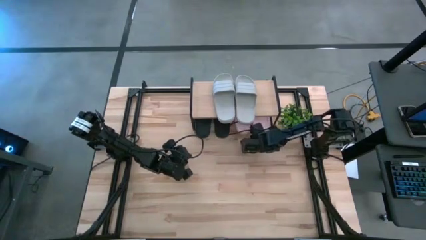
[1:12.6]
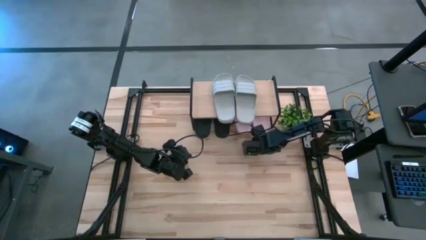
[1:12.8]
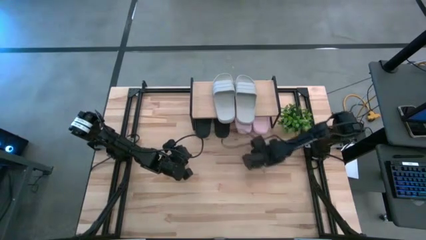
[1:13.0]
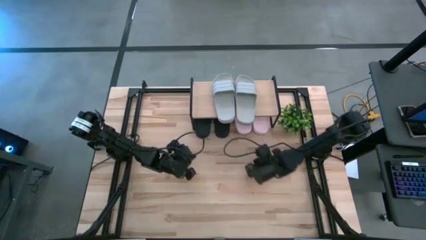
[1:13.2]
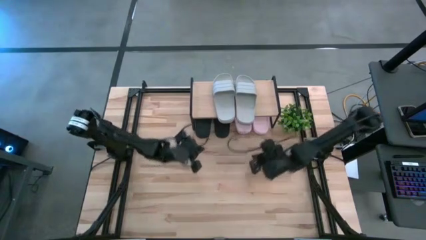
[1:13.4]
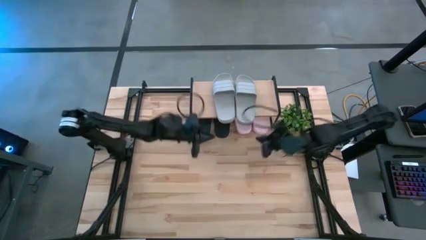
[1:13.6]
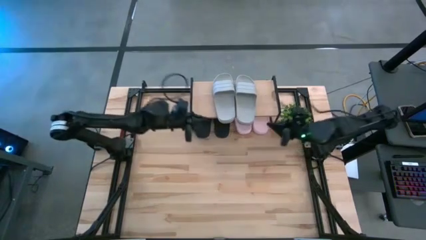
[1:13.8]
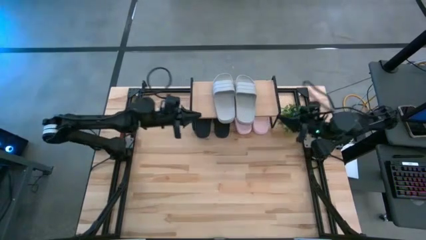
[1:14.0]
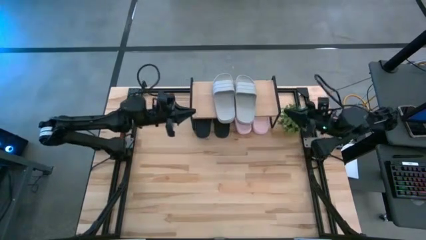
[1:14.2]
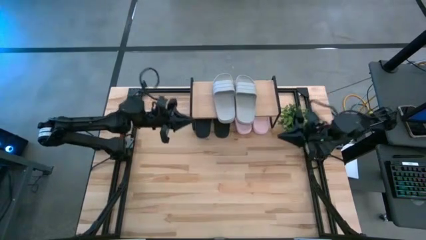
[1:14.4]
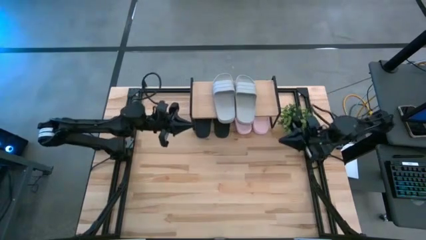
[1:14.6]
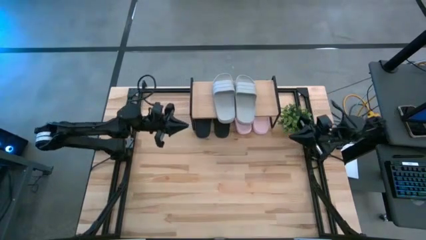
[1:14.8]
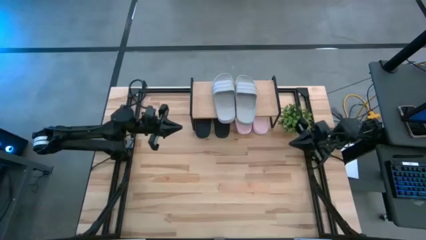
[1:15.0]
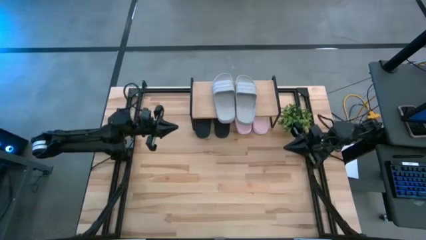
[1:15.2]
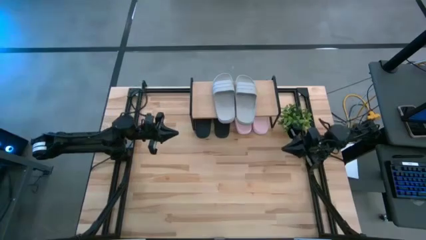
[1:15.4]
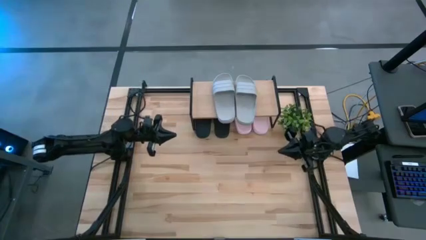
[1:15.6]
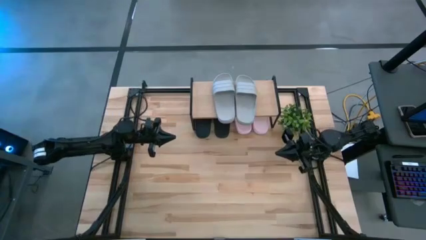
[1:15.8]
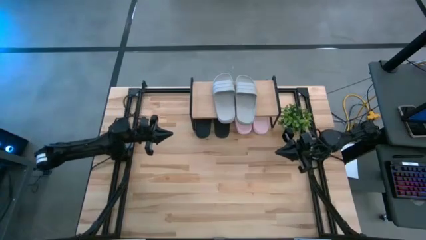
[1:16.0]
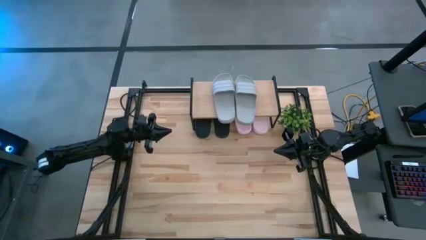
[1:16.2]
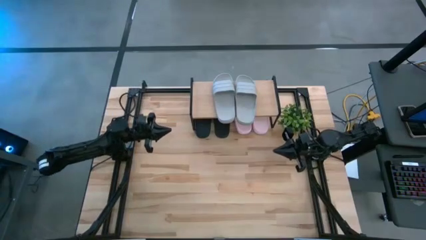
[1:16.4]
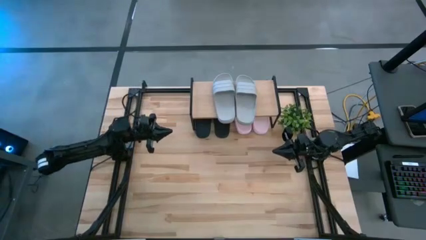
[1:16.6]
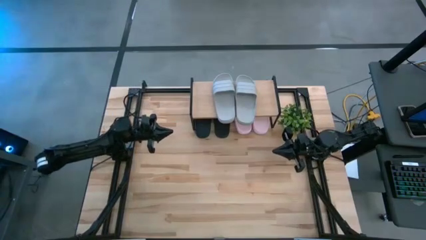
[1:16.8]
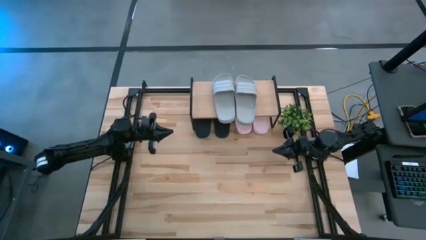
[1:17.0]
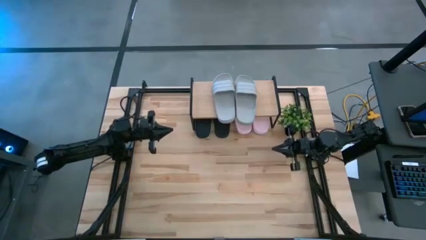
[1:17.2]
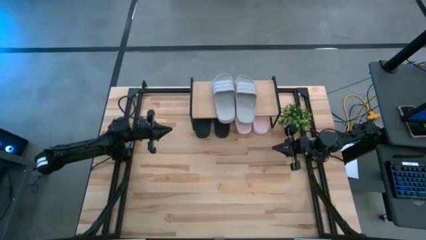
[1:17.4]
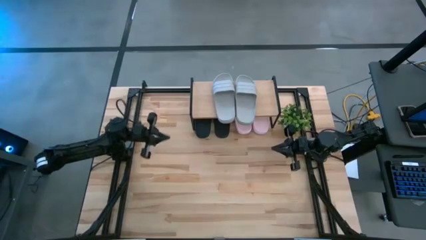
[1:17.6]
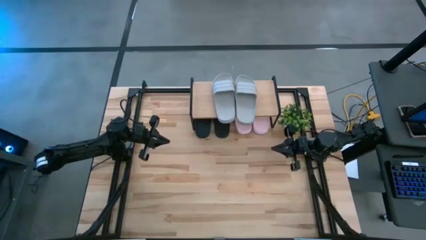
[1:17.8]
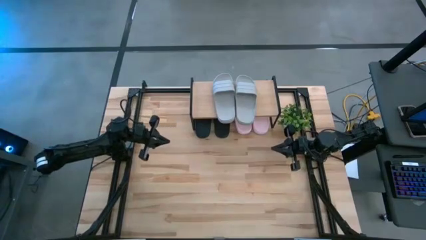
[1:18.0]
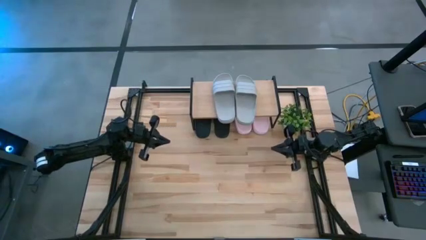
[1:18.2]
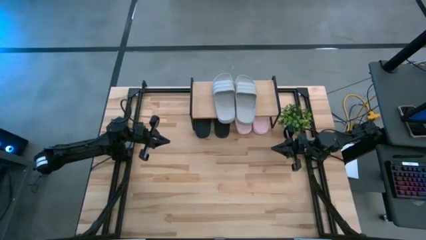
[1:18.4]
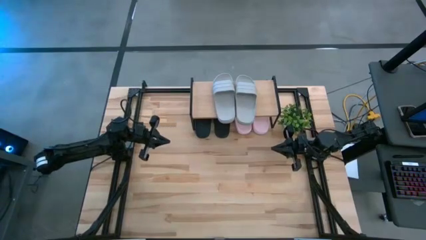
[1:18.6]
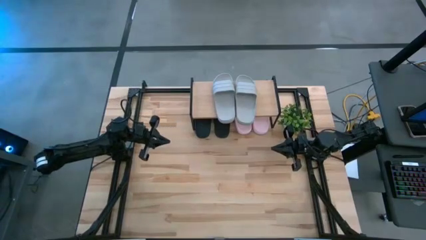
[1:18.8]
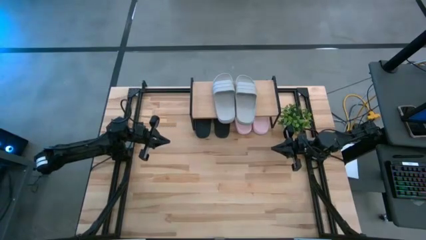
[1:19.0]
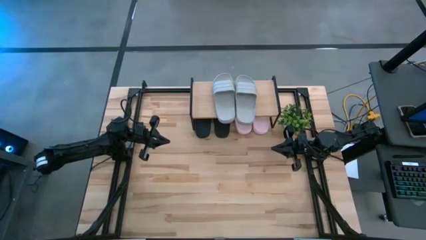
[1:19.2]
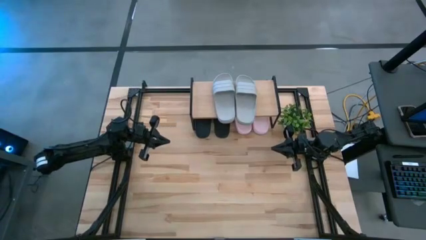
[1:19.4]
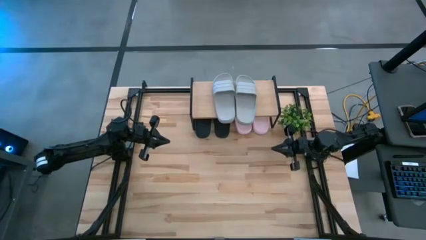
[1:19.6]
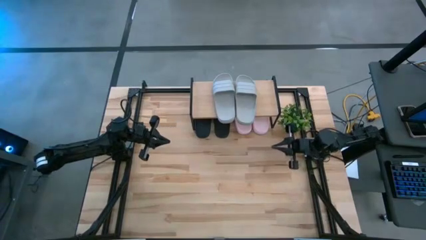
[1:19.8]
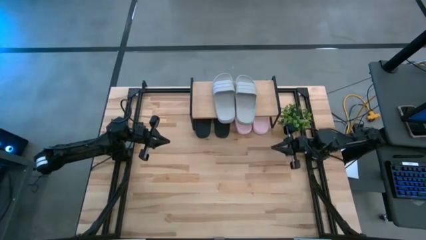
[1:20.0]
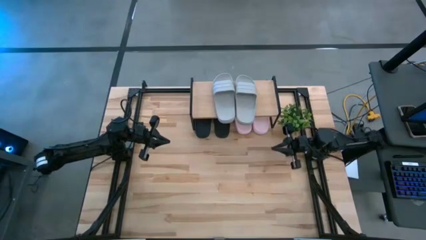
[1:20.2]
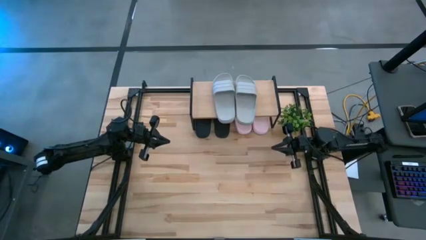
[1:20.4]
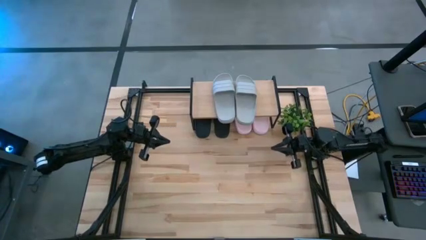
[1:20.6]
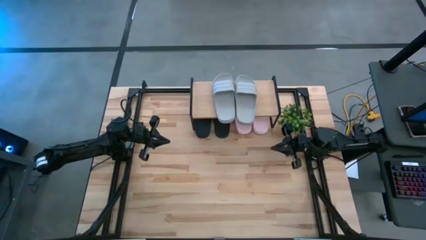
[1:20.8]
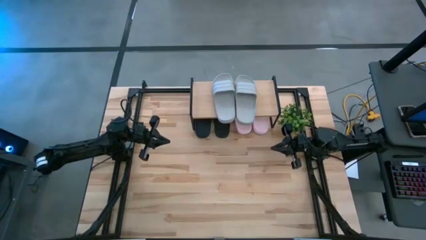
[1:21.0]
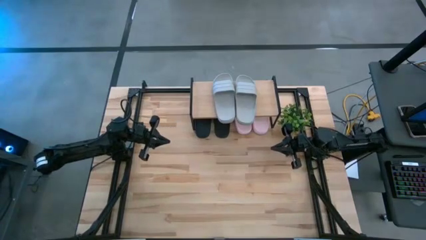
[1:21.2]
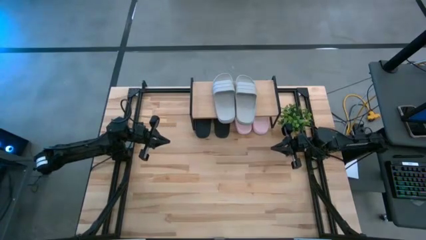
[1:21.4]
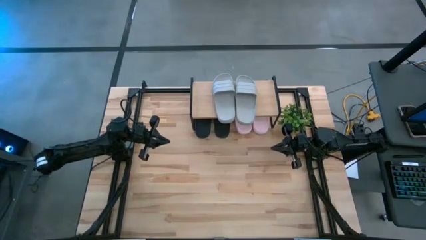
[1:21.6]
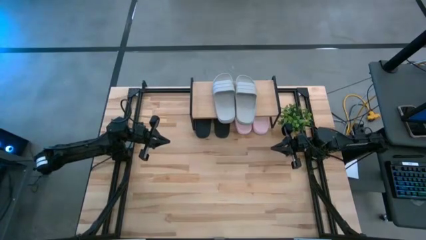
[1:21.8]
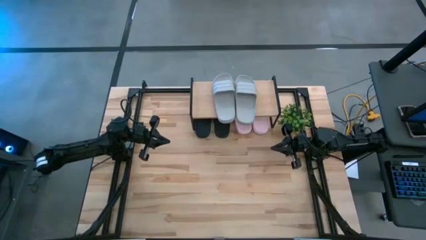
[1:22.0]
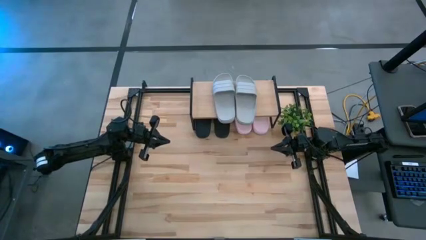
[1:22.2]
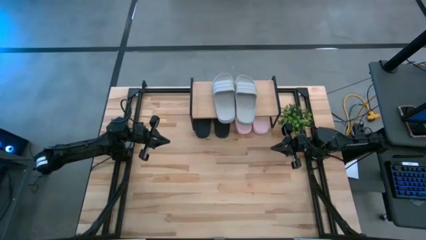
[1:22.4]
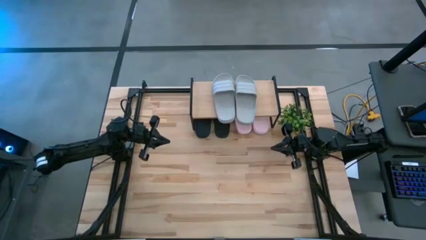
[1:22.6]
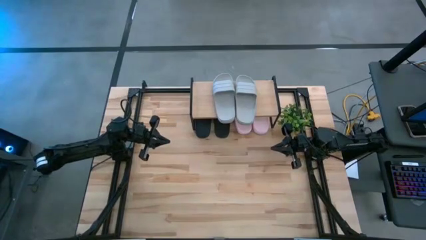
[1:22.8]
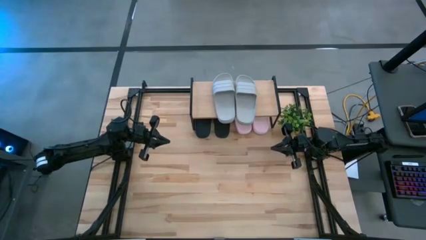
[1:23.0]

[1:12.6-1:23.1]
Task: Pick and place slides into the shelf
Return to Home Position

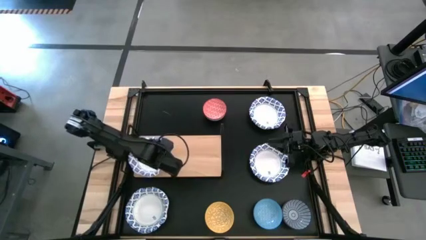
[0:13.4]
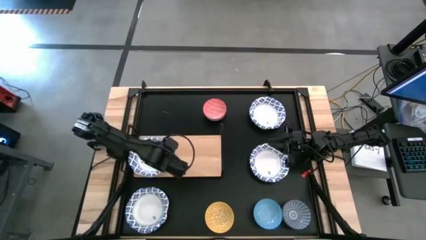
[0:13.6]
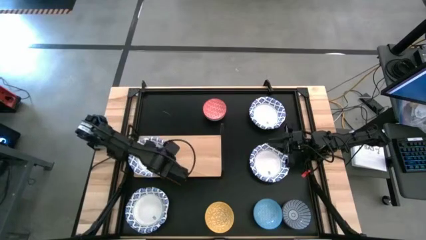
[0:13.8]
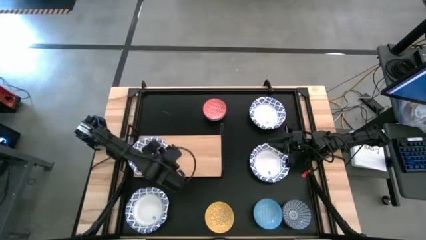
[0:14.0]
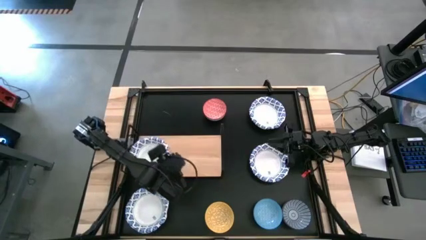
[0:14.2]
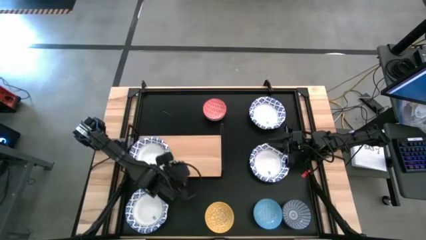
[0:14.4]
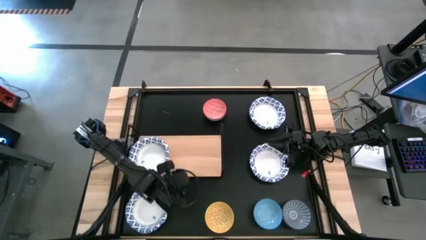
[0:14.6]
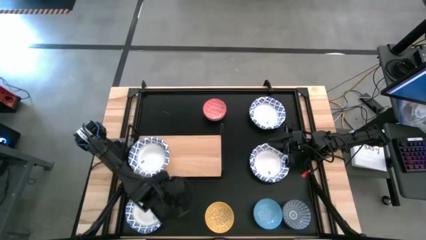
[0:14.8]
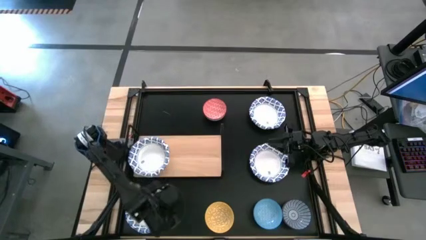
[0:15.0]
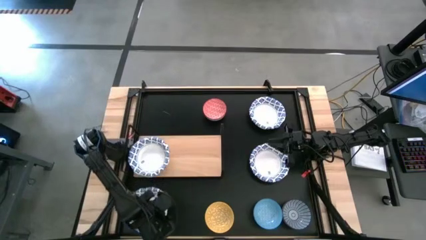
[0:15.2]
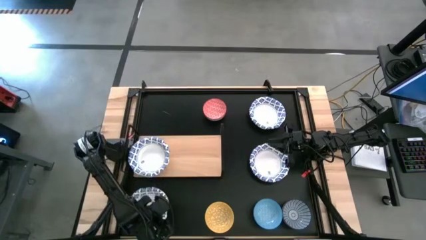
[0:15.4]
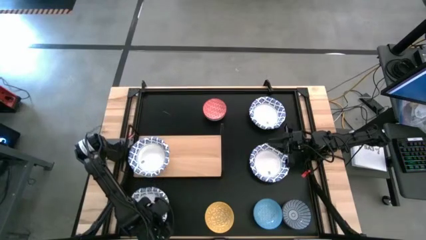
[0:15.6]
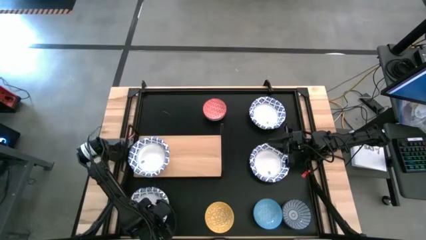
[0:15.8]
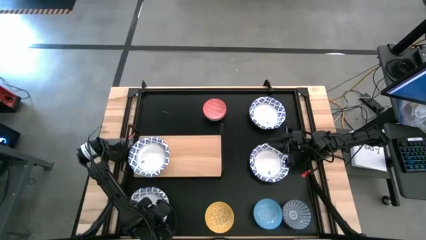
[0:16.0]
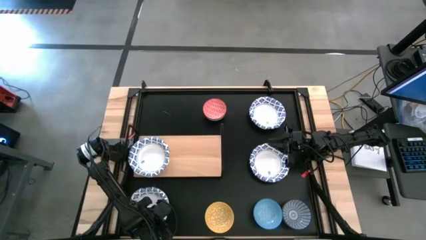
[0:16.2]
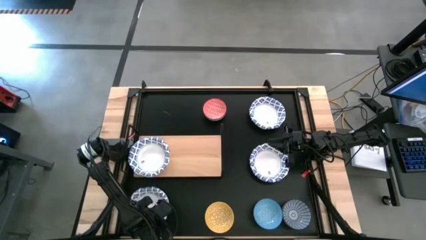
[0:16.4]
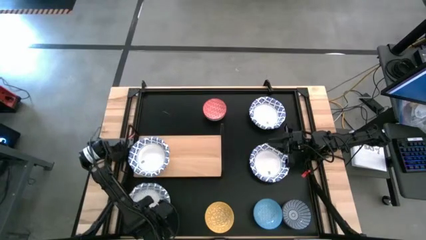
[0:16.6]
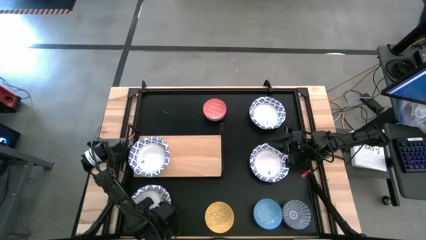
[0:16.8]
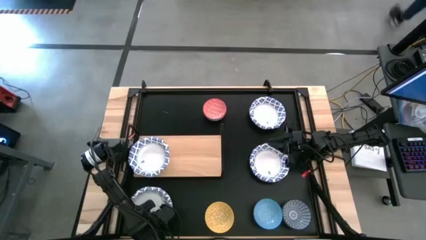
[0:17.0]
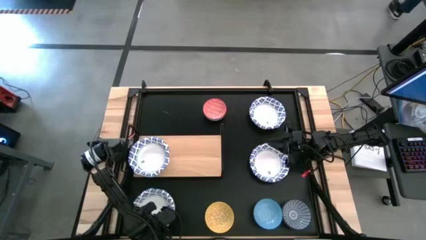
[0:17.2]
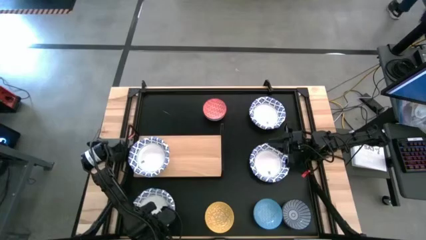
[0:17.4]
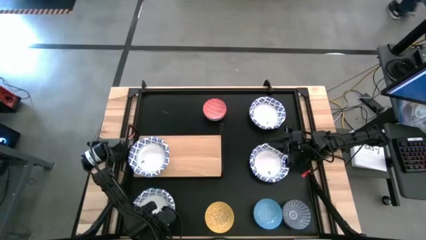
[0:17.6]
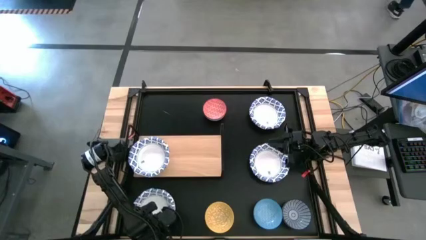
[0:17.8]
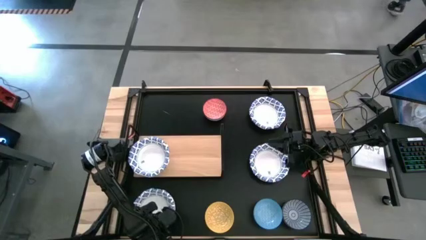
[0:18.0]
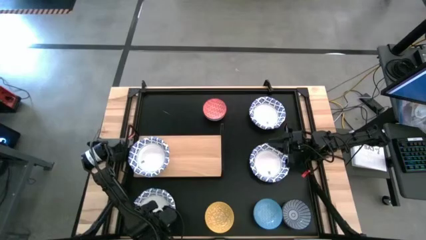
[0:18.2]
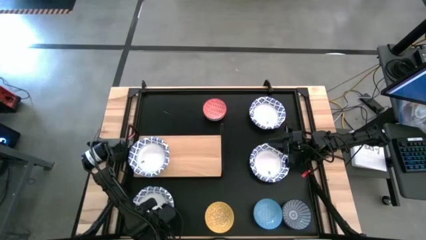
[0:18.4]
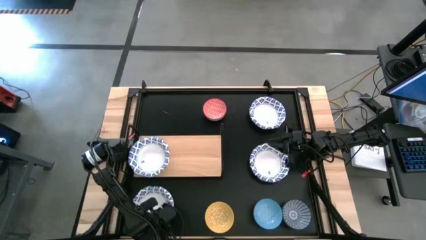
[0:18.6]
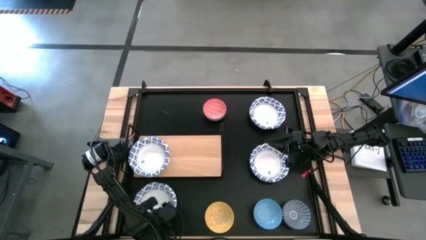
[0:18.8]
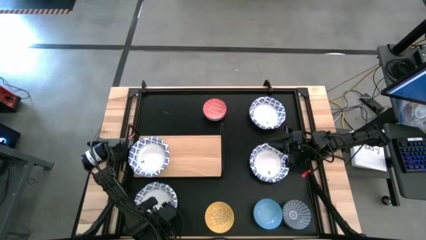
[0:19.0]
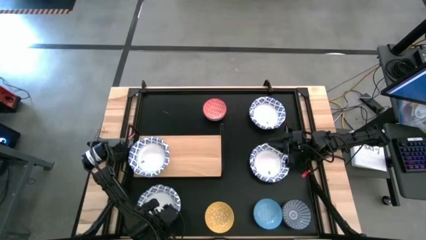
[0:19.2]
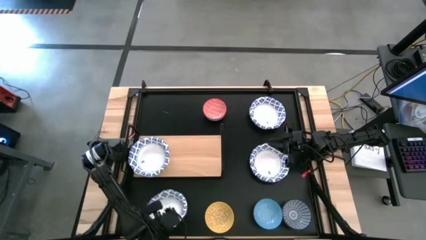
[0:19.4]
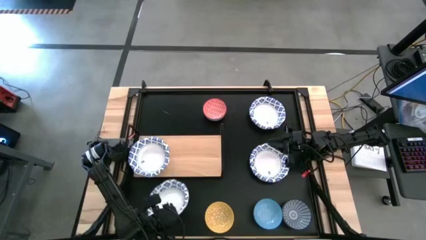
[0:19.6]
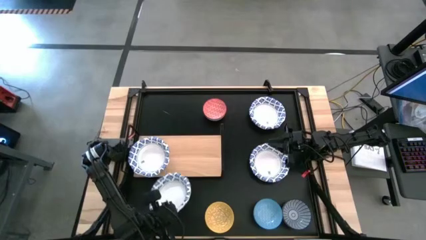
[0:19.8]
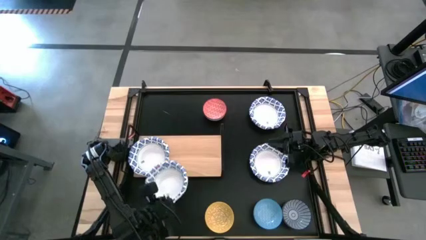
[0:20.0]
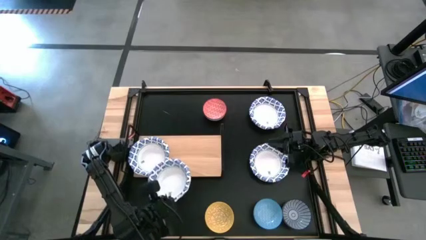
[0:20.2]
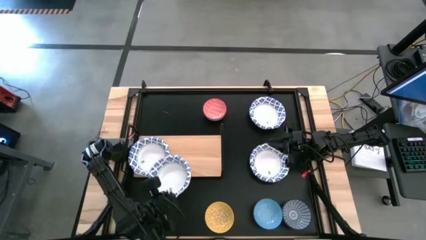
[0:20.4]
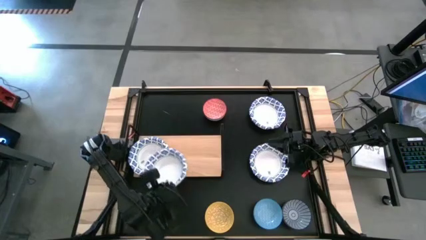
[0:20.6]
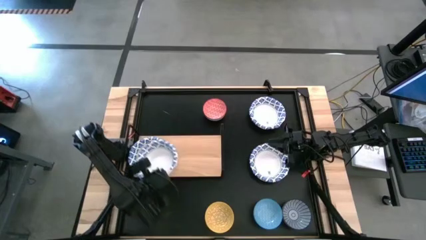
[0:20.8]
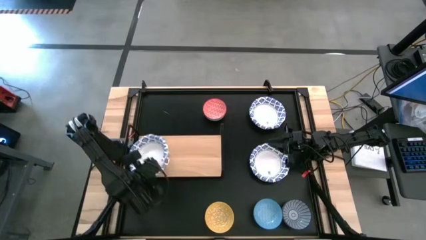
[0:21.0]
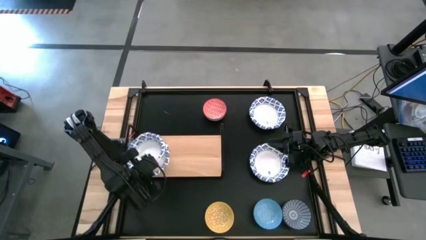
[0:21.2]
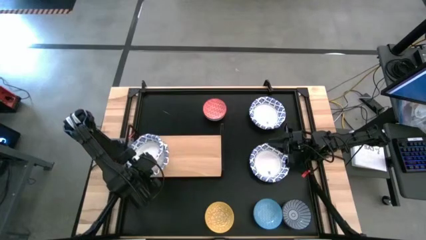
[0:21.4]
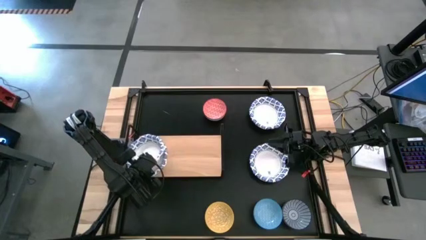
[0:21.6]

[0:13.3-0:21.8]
Task: Place and stack bowls onto a shelf
Stack the blue patterned bowl on top of the blue patterned bowl on the shelf
